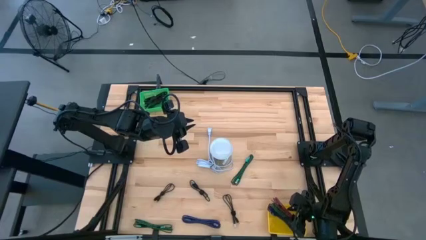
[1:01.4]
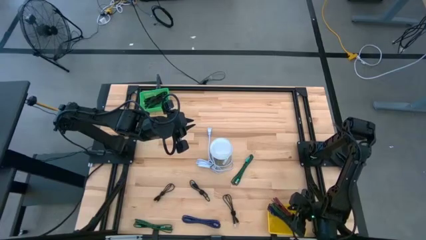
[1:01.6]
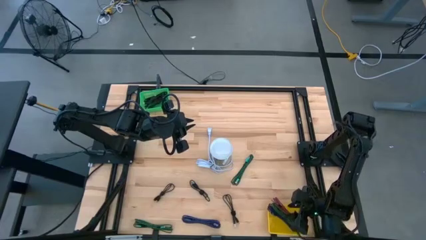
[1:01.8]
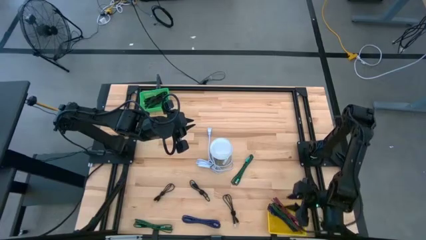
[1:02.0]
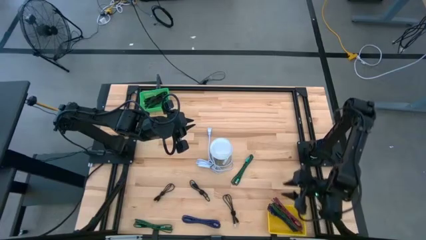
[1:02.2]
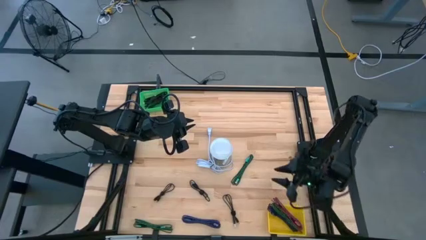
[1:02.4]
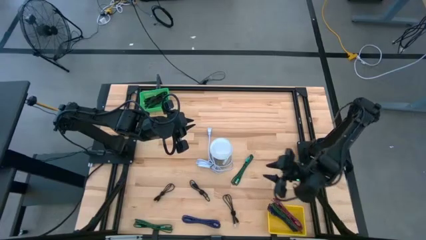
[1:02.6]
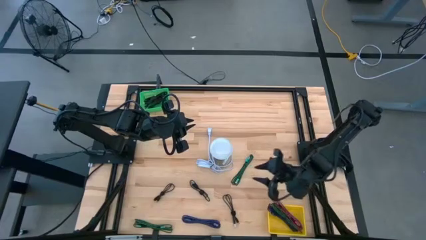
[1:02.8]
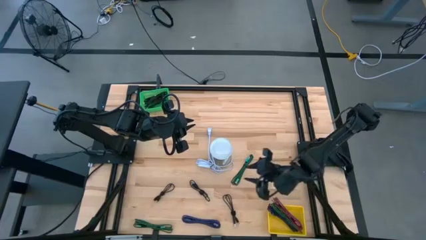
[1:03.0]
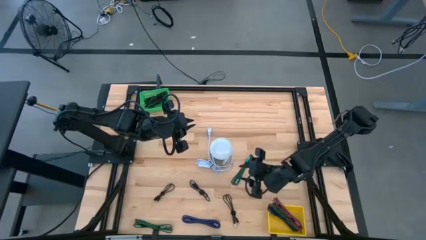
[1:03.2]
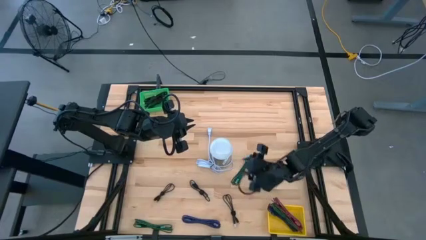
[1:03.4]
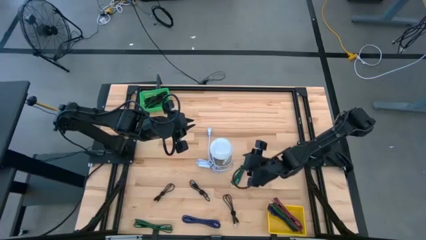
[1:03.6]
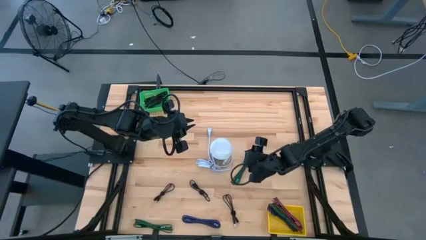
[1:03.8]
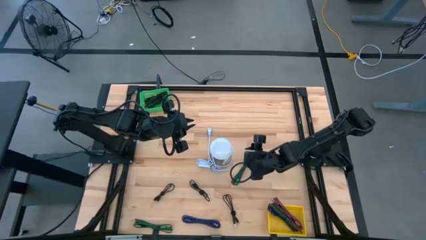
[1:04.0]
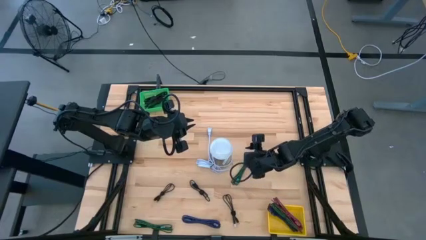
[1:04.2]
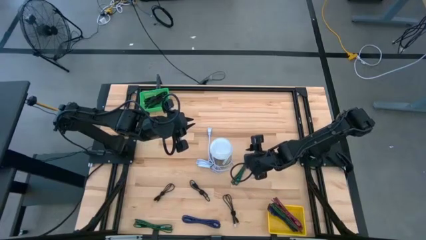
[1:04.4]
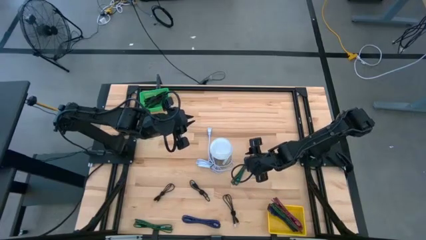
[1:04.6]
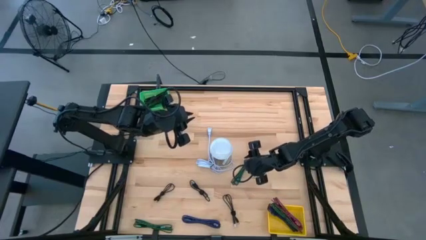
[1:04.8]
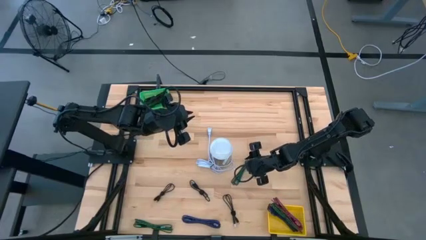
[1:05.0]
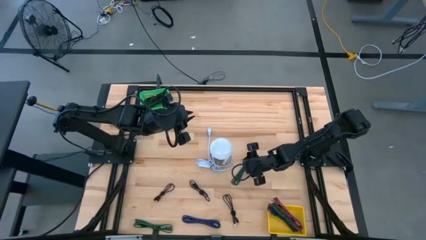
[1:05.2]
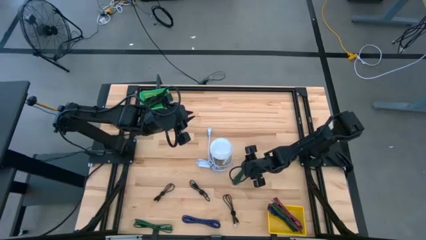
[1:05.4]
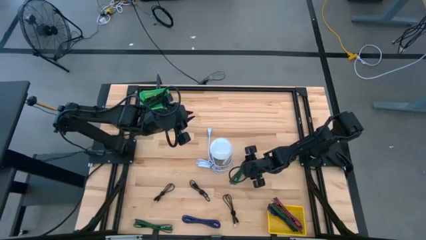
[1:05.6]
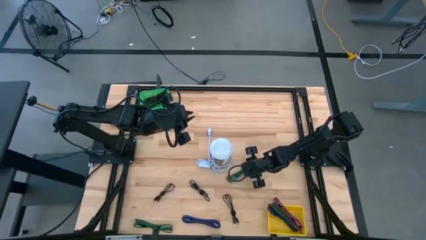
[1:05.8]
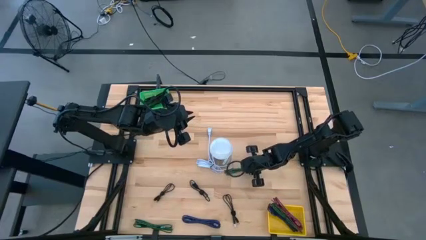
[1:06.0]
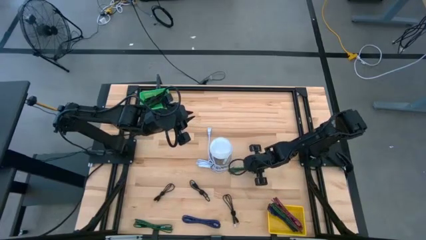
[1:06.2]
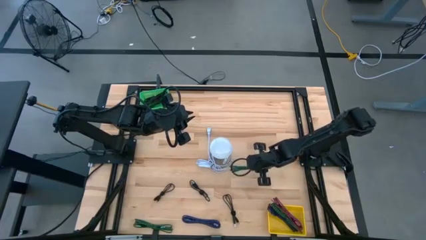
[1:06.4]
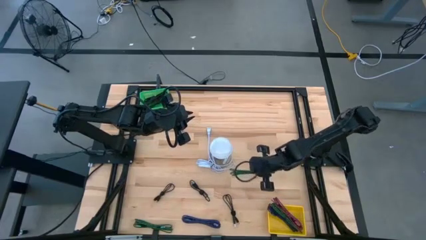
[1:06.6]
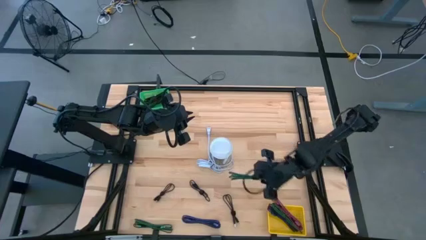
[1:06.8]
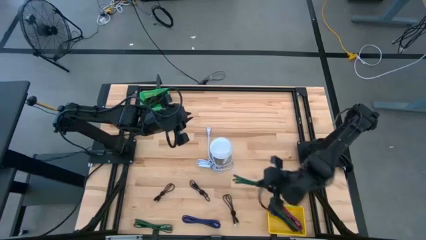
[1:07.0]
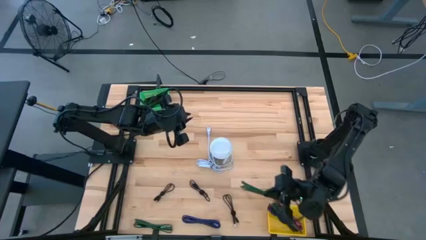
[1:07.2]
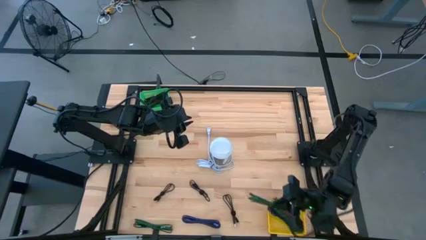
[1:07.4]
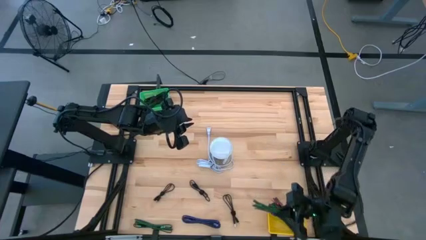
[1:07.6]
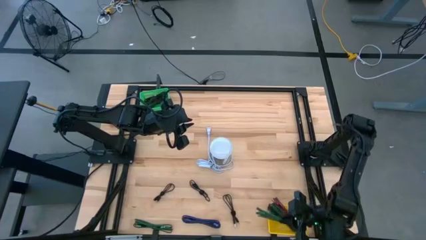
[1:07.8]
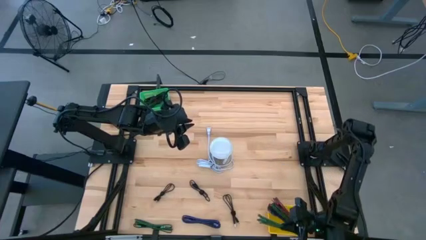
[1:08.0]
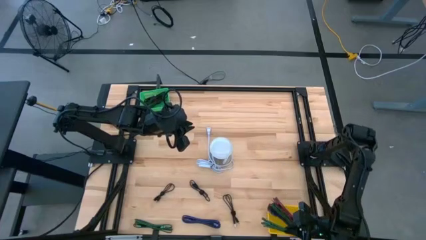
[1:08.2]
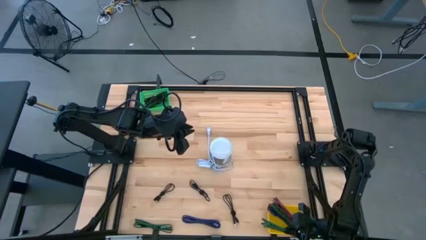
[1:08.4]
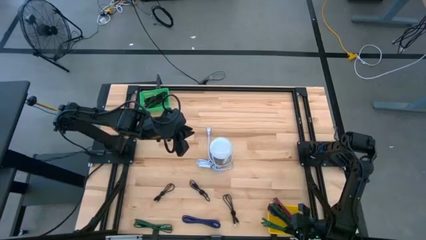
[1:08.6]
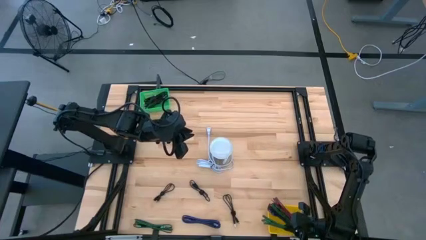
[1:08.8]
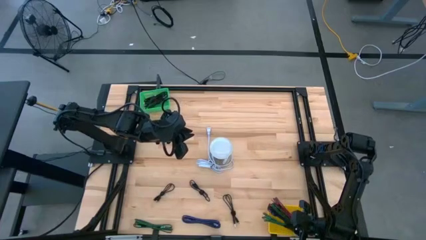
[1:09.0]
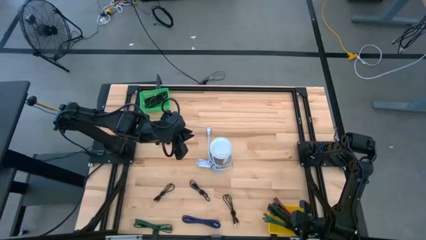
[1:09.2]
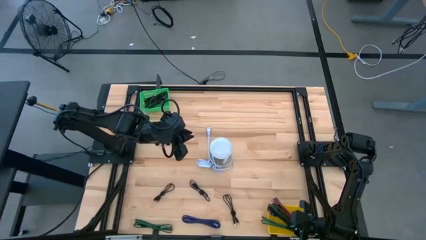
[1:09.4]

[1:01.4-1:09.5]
Task: Pick & Place USB Port
Put the green black charger cable into the yellow basket

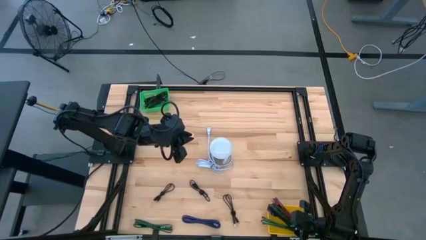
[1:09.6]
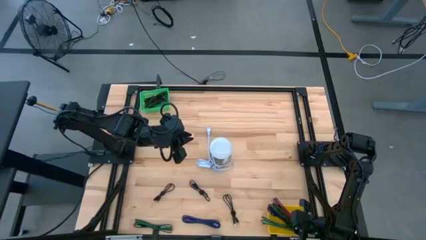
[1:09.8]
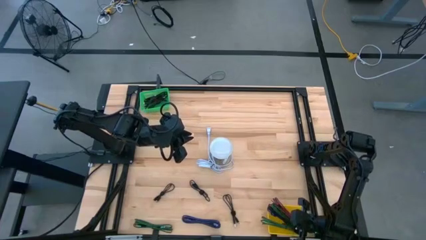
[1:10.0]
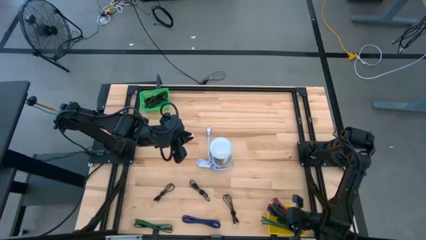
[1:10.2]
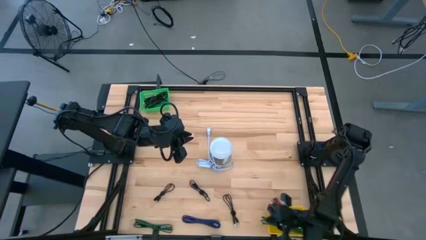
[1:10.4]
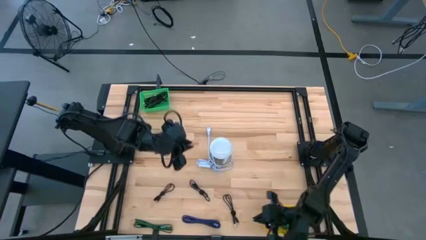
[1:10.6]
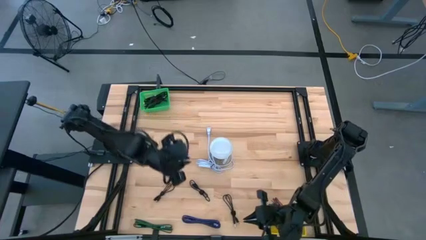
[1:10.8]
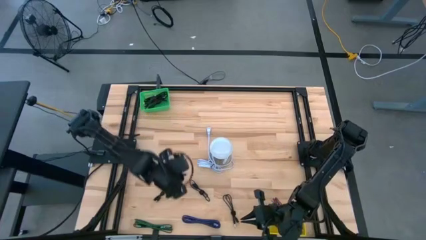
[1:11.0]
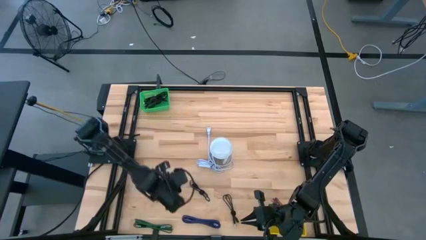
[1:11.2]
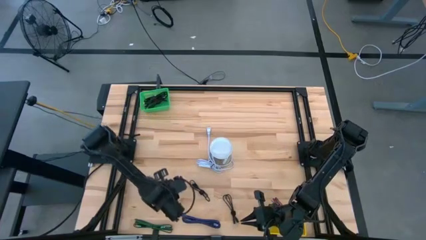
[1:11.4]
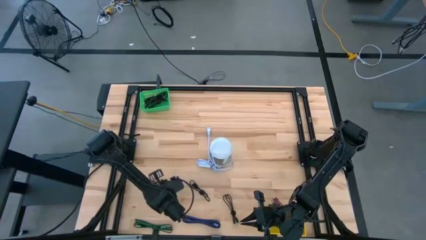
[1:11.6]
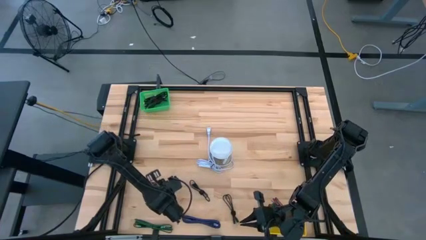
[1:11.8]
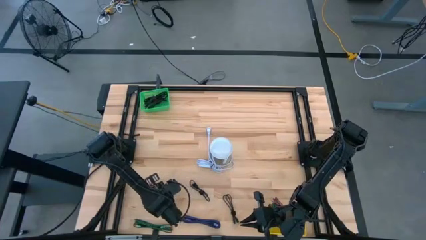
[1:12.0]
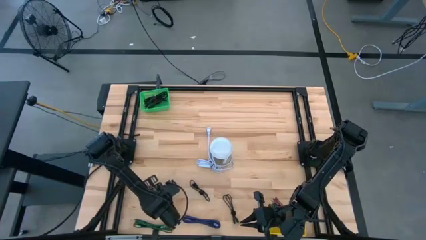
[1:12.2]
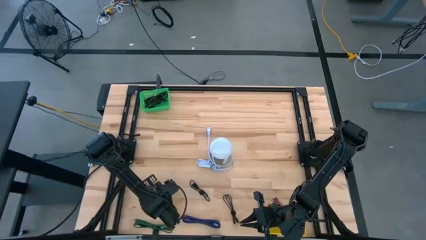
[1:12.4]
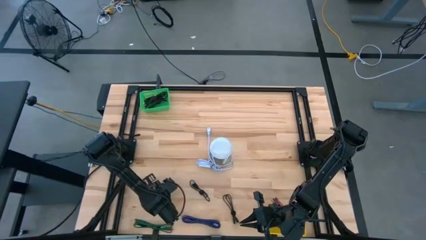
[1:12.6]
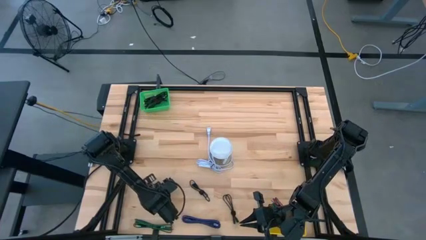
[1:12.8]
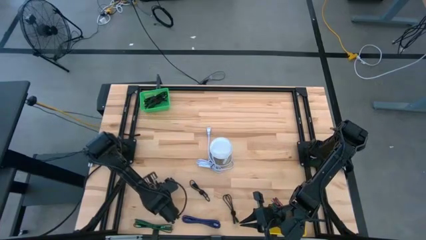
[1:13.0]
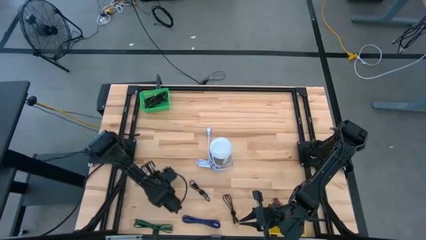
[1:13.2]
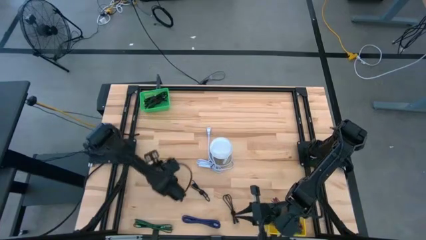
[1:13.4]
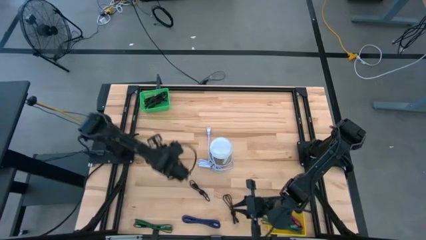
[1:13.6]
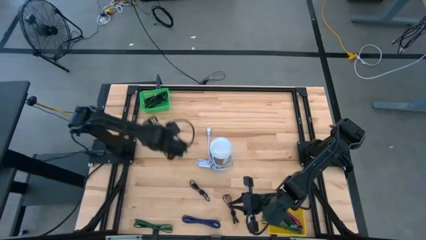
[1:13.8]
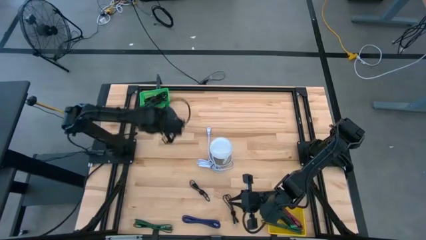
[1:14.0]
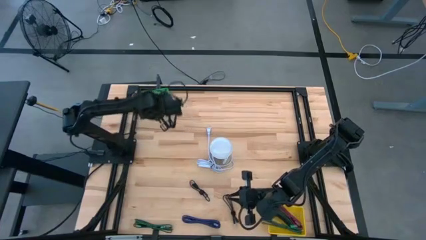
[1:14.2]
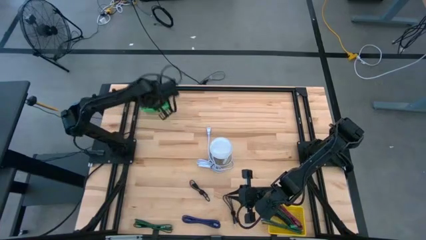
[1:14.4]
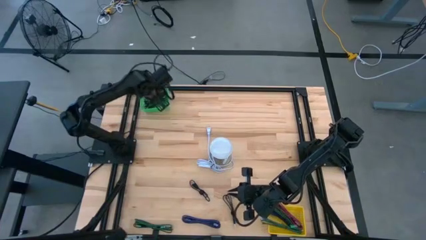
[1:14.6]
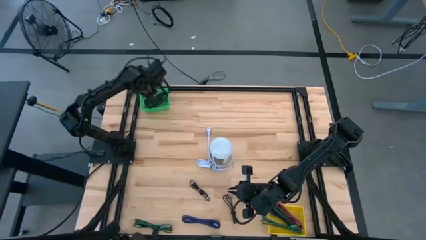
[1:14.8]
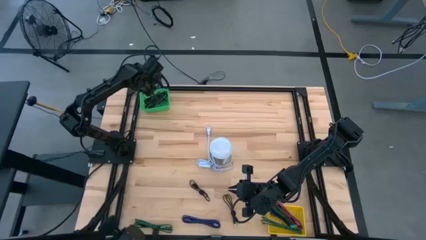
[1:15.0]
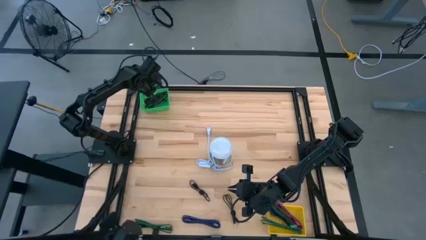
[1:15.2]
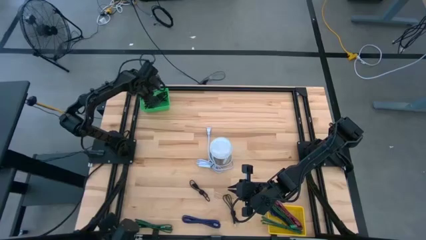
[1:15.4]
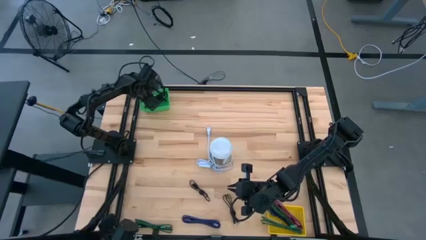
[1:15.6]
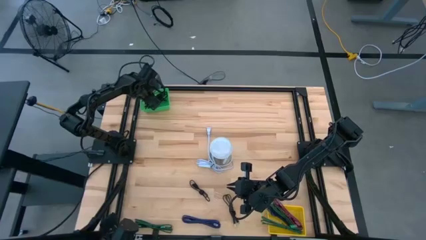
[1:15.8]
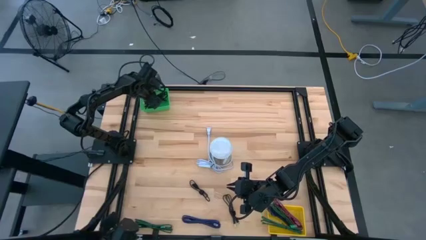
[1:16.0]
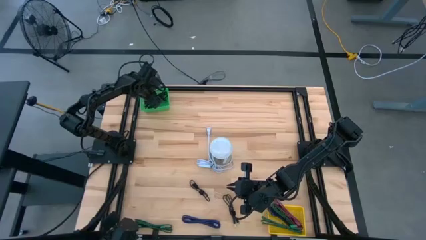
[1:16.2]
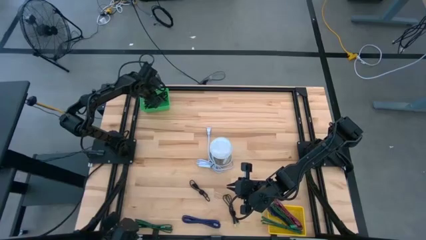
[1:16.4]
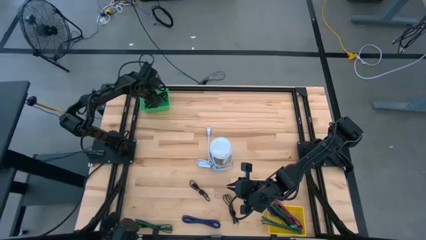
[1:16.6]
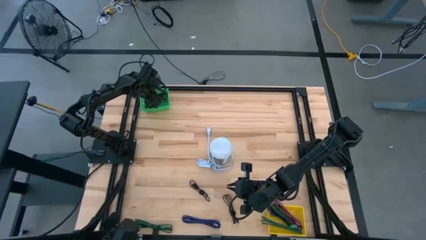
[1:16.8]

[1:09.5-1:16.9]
Put the plain black charger cable into the green basket

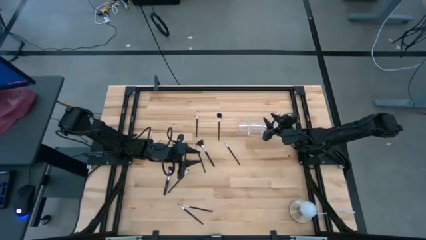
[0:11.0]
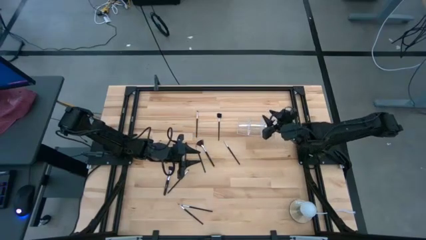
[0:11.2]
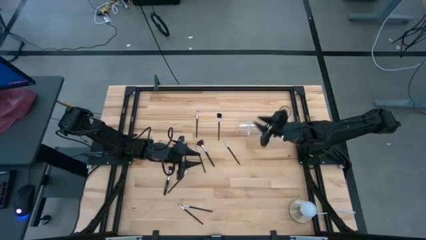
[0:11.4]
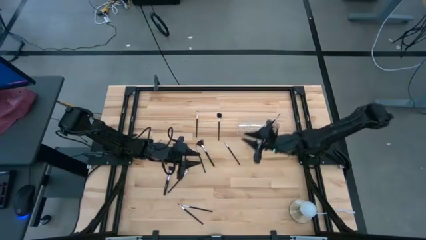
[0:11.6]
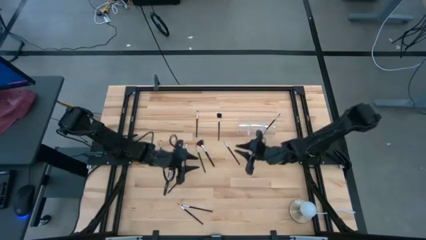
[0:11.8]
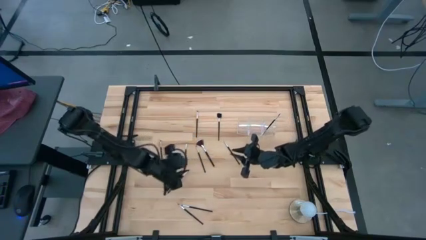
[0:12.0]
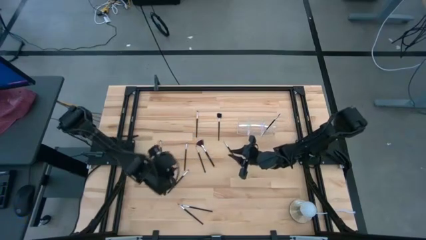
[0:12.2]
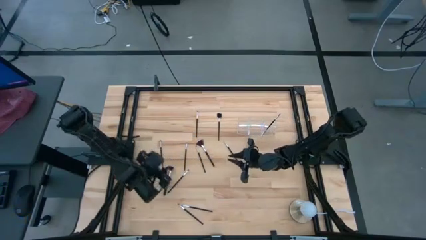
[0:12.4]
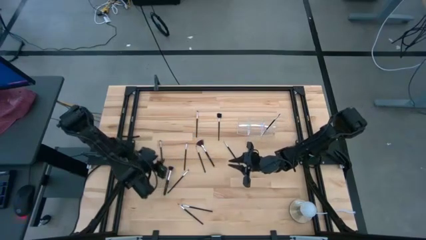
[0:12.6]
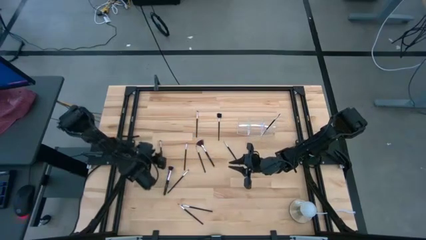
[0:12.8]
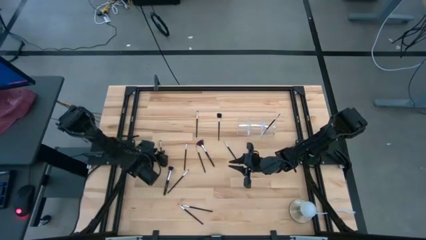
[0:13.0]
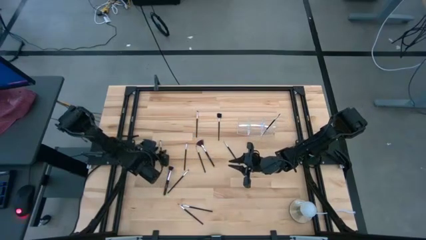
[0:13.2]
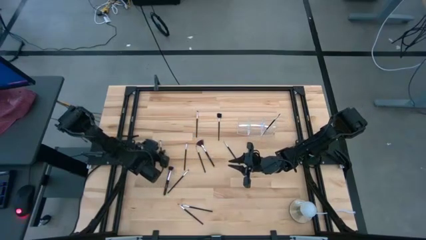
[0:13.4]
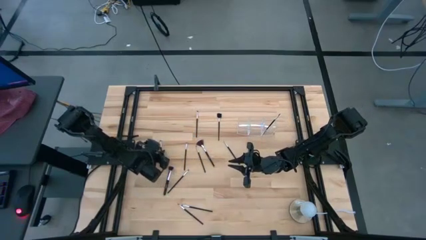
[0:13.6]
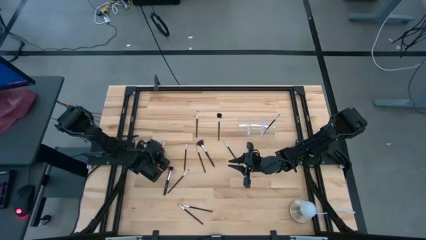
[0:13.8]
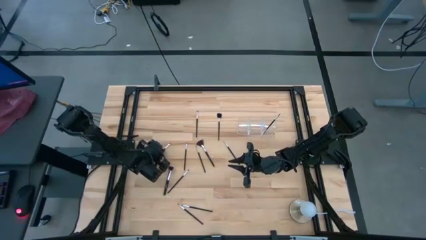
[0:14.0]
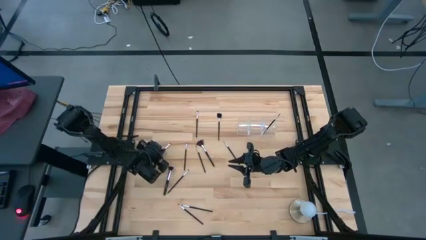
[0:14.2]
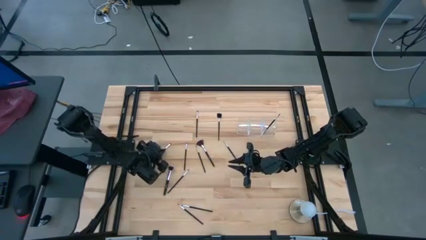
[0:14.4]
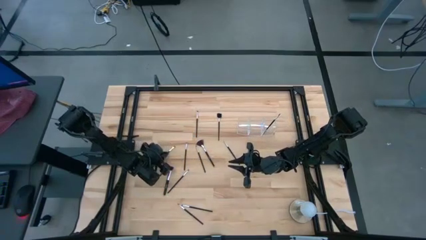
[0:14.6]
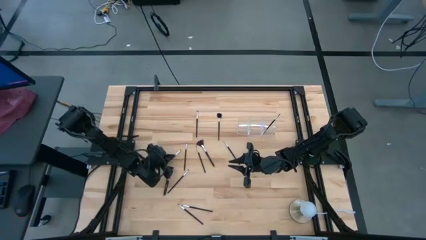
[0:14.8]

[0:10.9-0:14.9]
Task: Put items in baskets/containers
Put the black eyeshadow brush into the transparent organizer
